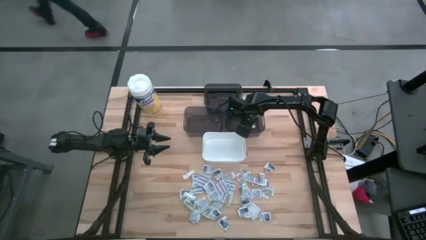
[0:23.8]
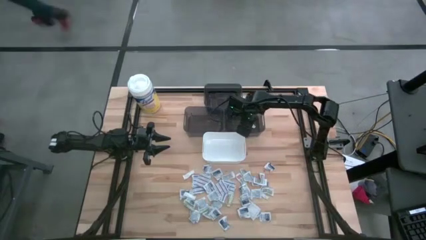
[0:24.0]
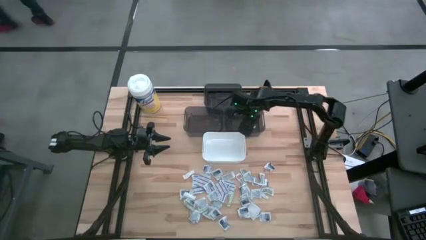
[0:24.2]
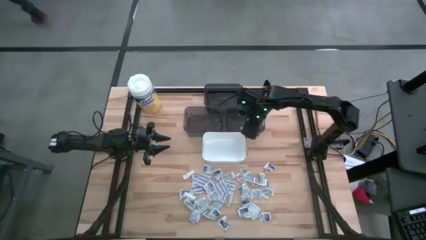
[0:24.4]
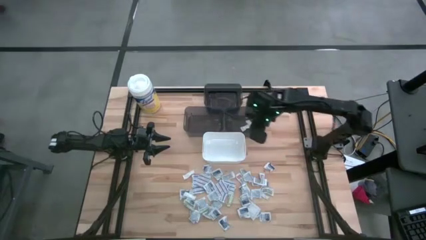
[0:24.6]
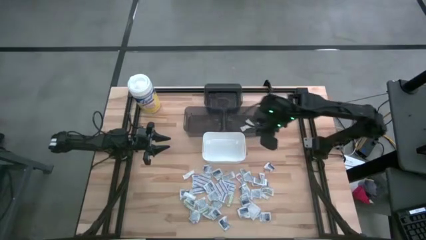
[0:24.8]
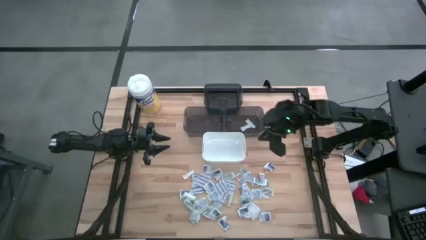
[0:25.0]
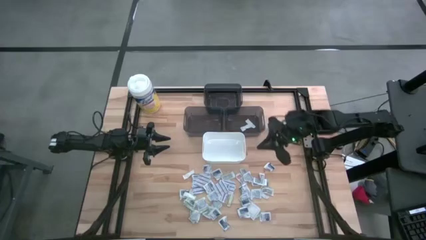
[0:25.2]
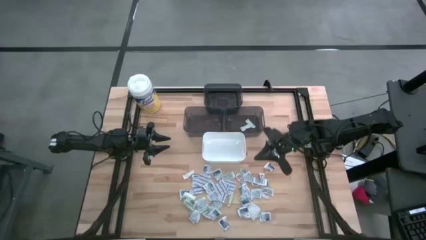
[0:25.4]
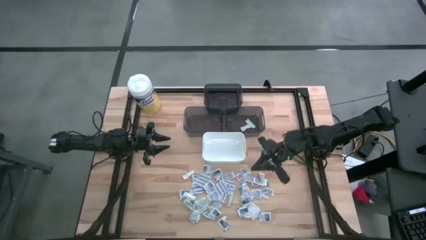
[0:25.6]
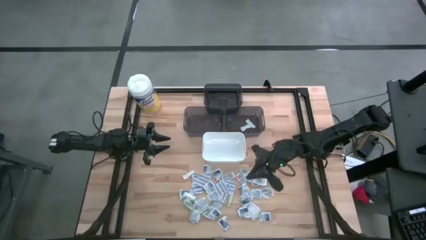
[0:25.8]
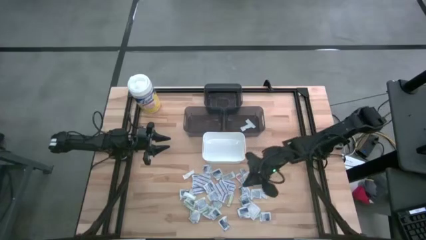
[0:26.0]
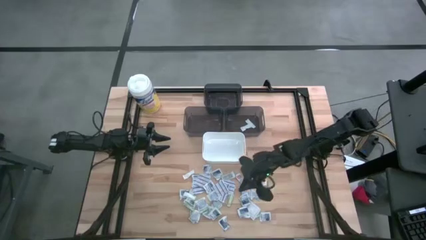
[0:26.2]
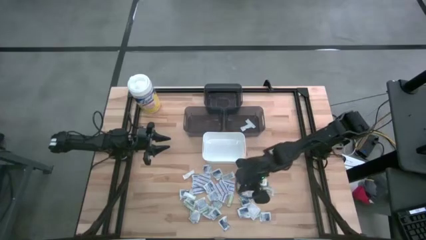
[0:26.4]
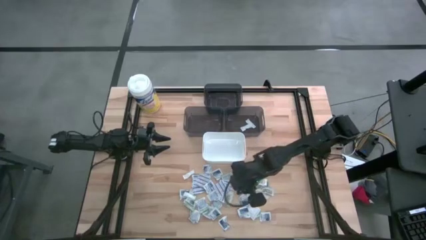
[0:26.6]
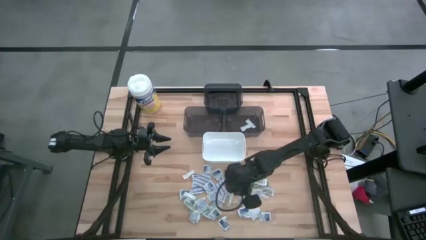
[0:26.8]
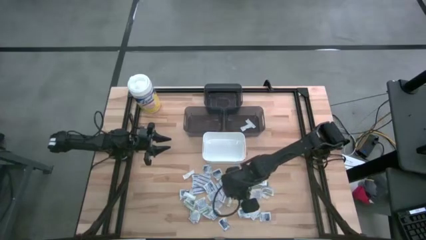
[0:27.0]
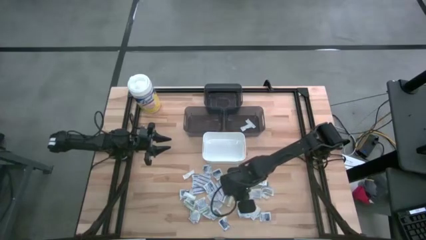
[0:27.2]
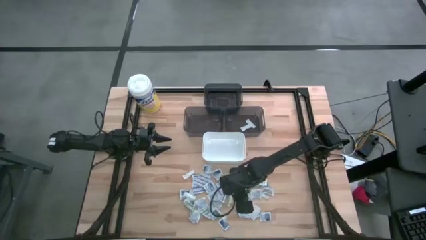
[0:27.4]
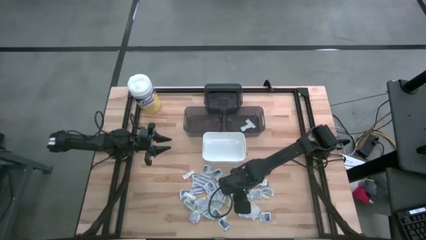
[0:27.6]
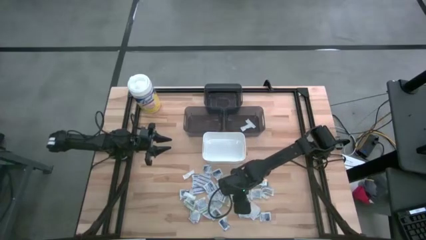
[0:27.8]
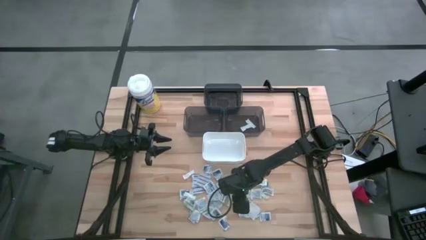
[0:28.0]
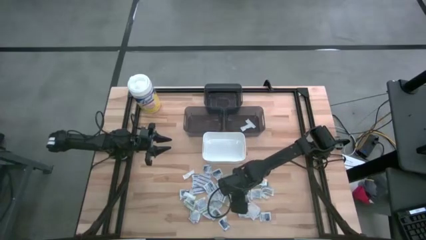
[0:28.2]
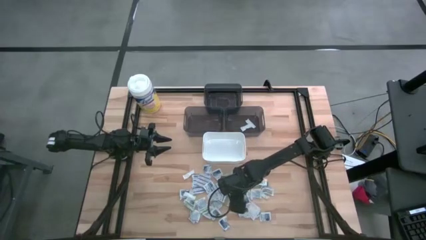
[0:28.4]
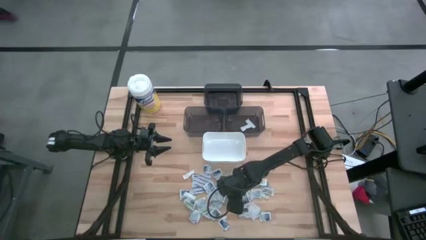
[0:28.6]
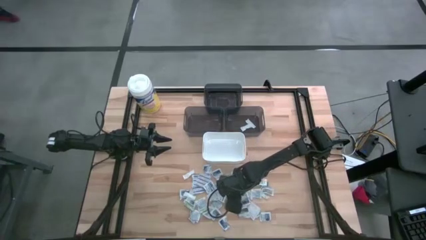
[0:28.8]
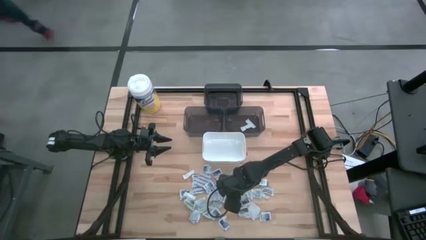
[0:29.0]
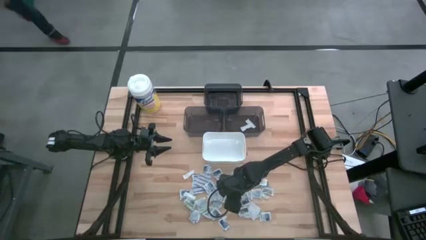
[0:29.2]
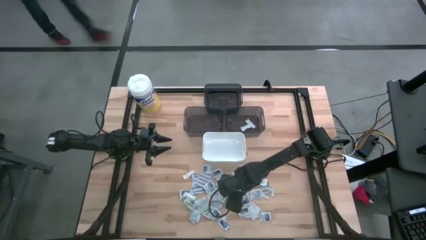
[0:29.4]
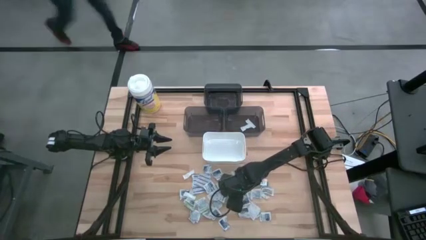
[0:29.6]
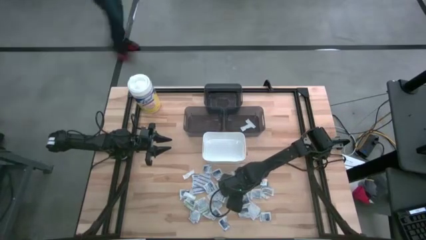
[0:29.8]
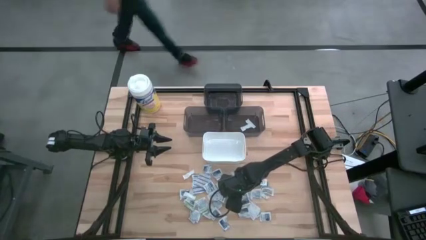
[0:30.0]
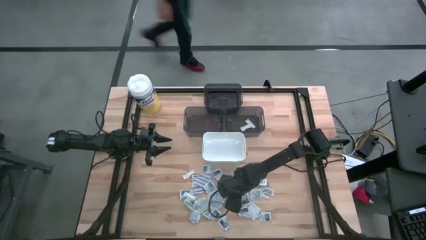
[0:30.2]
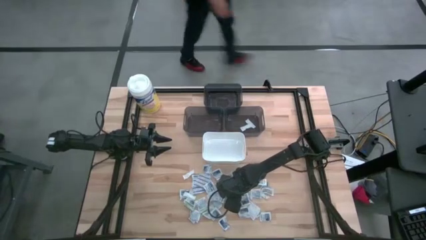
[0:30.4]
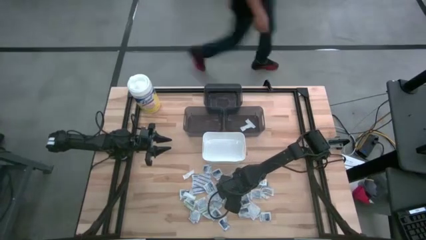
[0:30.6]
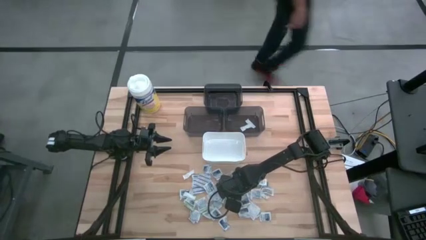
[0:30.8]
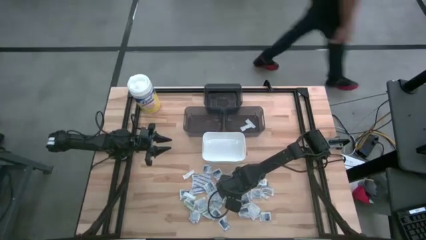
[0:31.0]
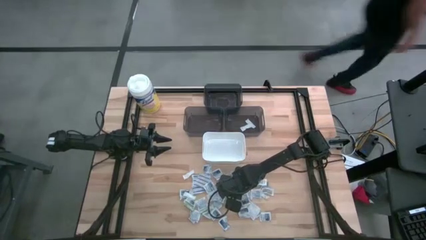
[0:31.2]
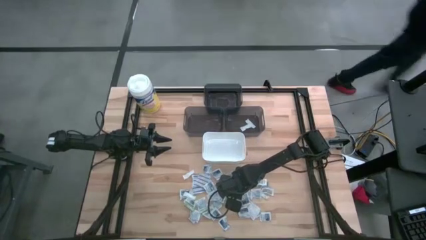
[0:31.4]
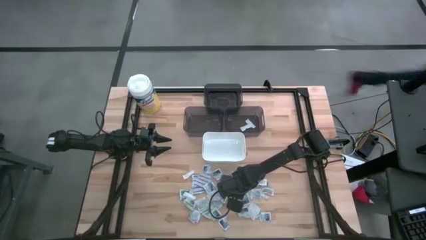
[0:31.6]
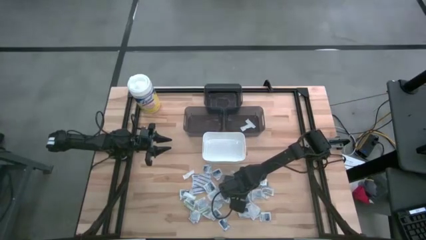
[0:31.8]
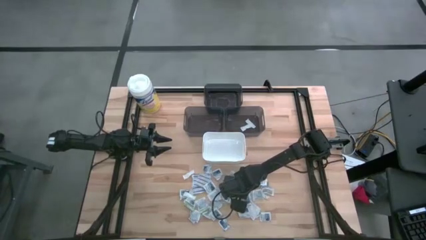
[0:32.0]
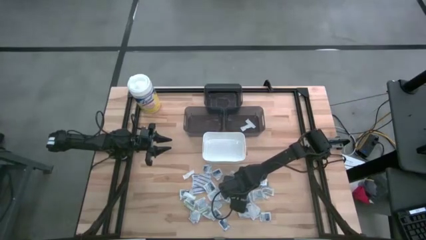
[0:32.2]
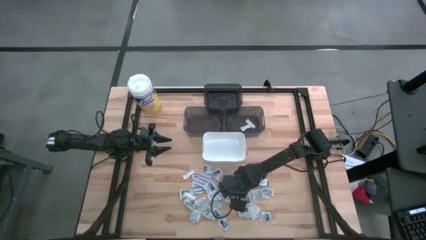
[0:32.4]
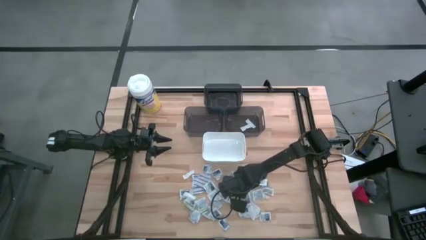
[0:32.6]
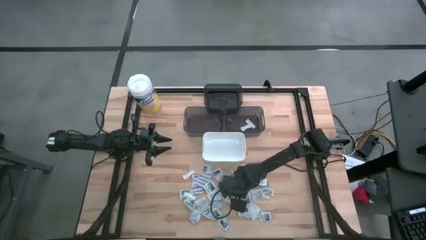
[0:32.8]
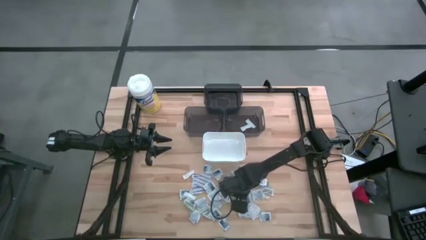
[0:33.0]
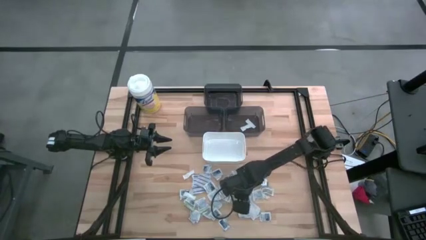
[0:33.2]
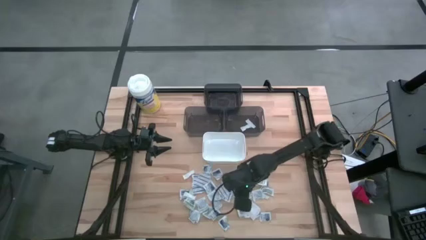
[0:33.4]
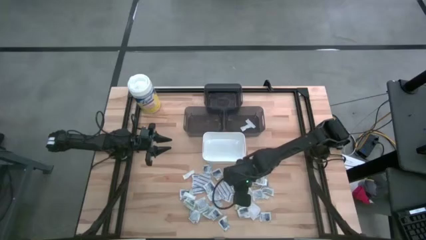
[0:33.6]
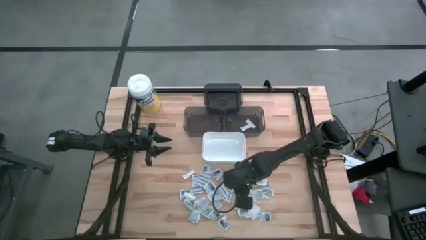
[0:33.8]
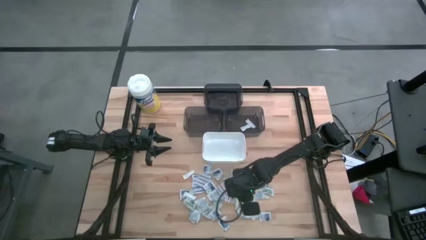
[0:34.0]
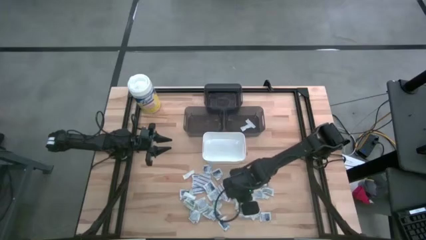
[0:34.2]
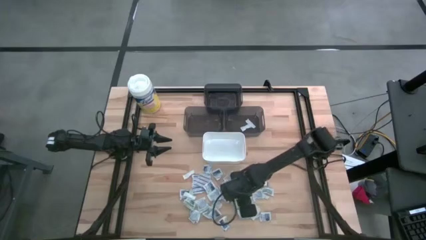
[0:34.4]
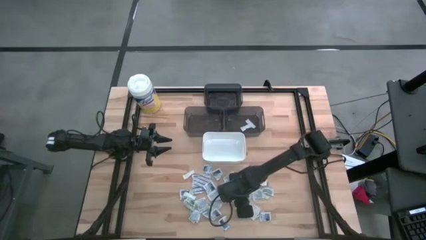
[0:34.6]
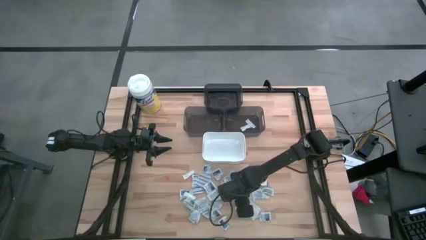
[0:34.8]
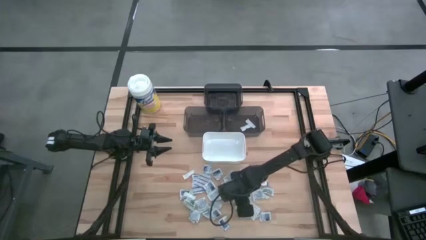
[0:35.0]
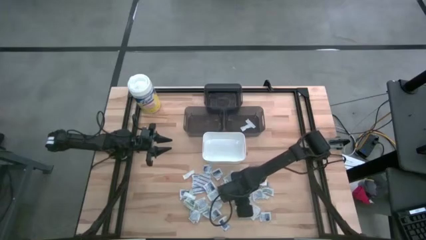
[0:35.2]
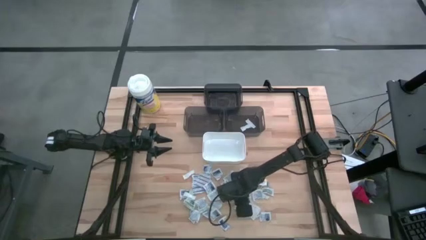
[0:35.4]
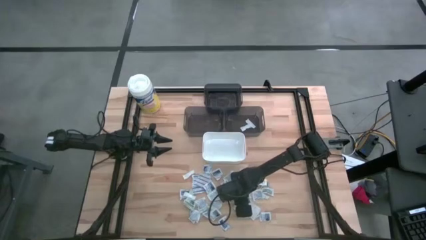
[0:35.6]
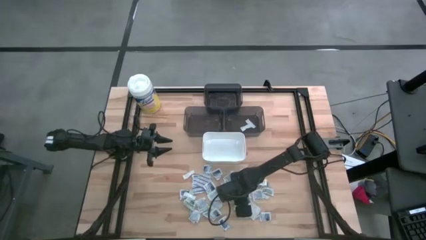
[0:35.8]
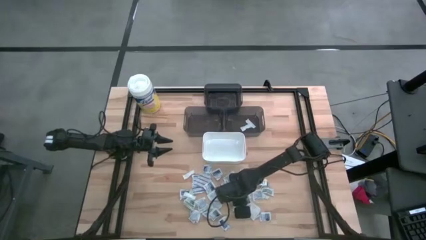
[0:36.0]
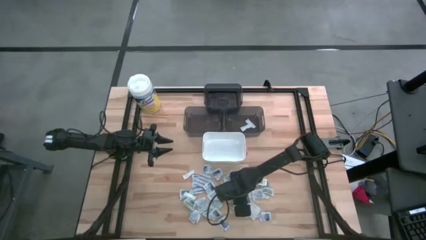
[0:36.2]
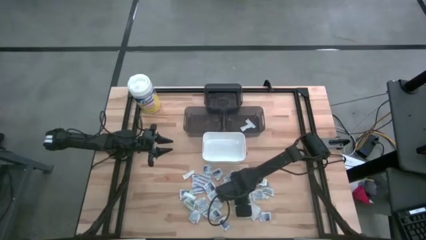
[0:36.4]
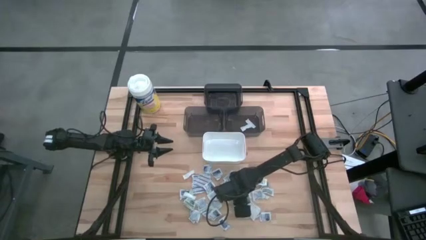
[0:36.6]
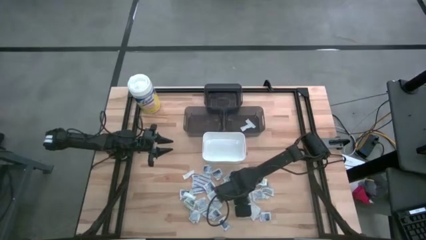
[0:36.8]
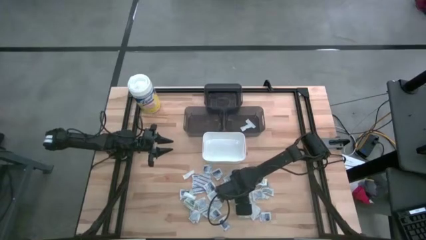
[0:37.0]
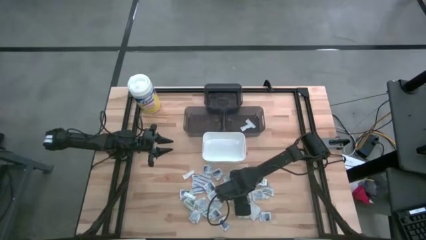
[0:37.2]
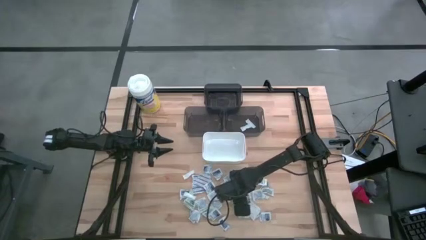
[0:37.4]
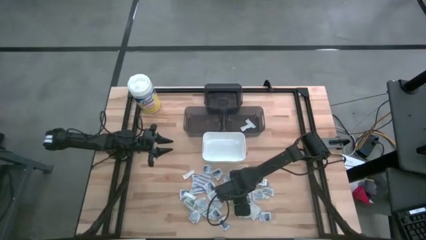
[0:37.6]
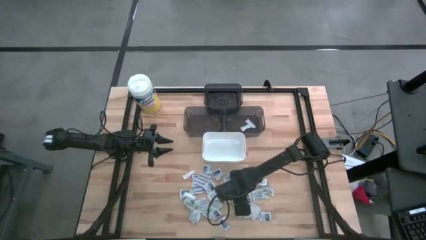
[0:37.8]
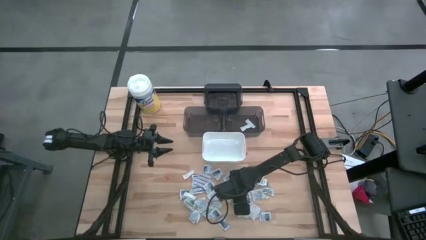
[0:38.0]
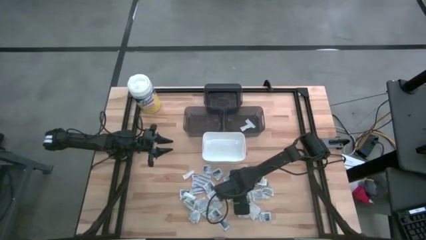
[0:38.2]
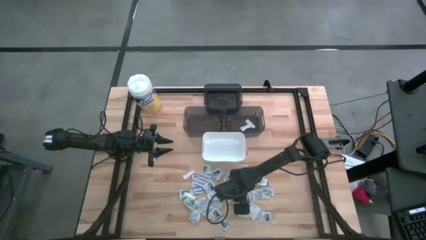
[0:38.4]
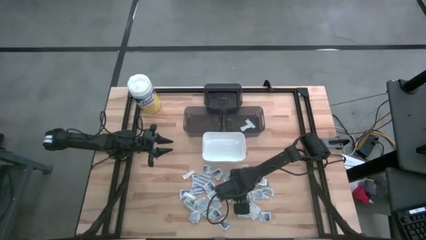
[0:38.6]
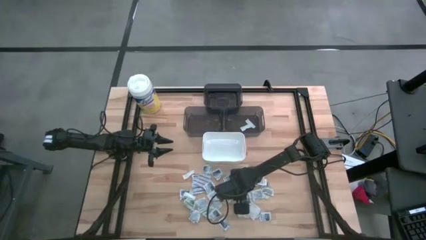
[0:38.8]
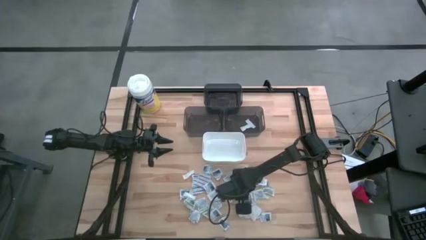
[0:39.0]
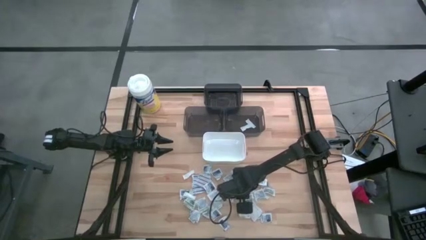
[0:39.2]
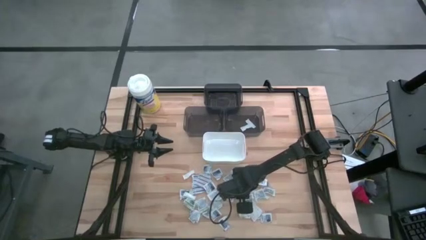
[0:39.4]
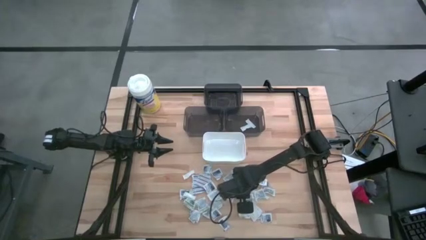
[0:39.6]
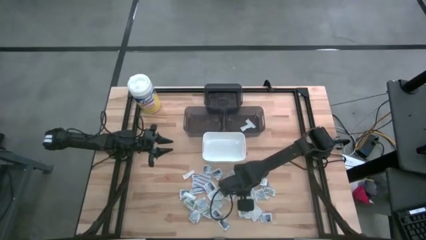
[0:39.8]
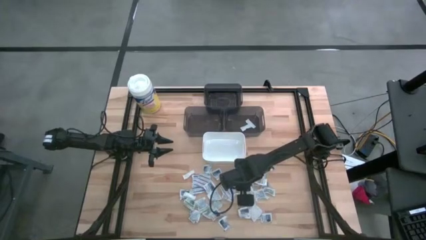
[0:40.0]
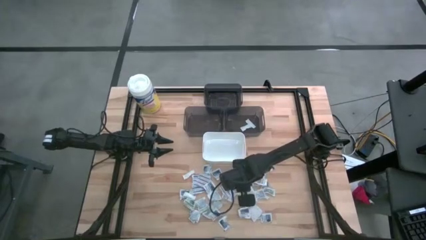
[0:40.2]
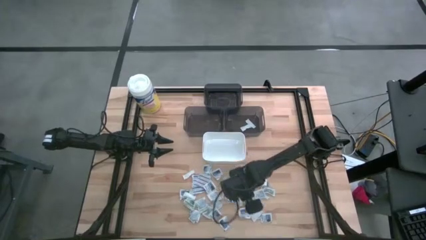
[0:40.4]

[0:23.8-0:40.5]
Task: Pick & Place First Aid Supplies
Put the green bandage into the bottom right black bin
